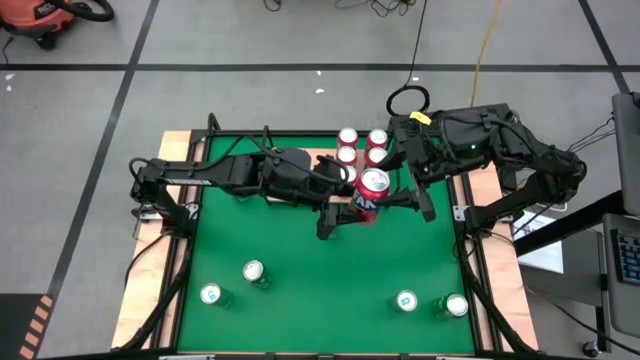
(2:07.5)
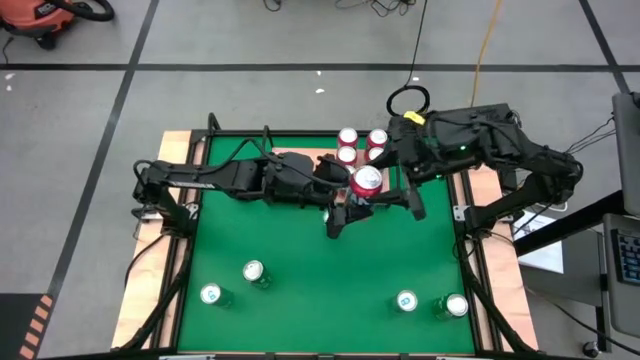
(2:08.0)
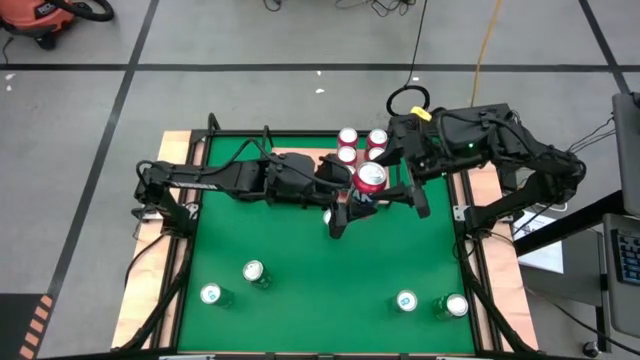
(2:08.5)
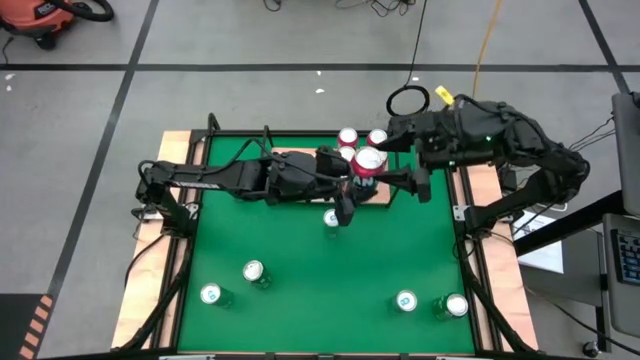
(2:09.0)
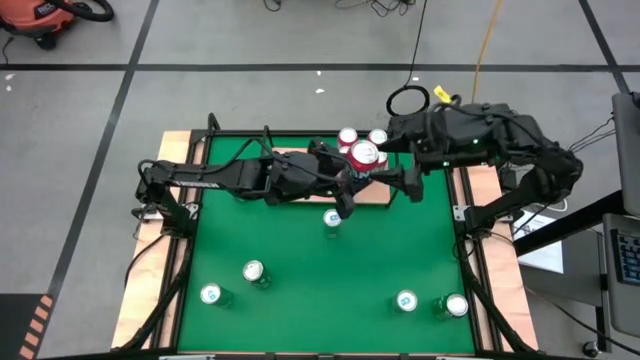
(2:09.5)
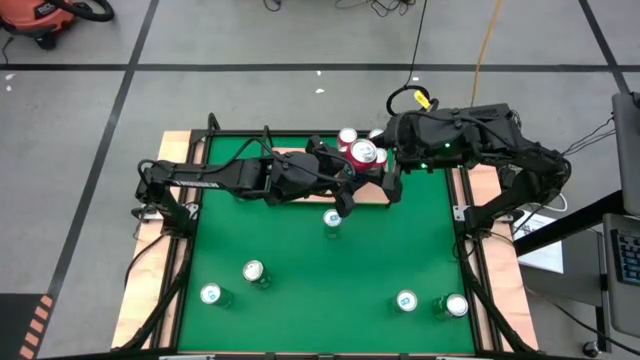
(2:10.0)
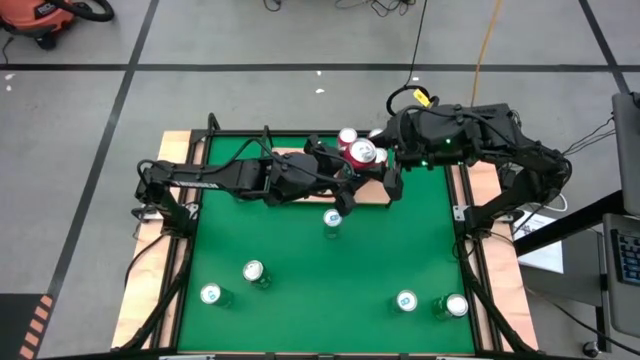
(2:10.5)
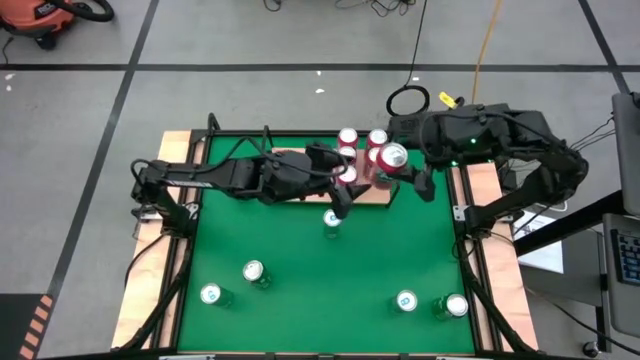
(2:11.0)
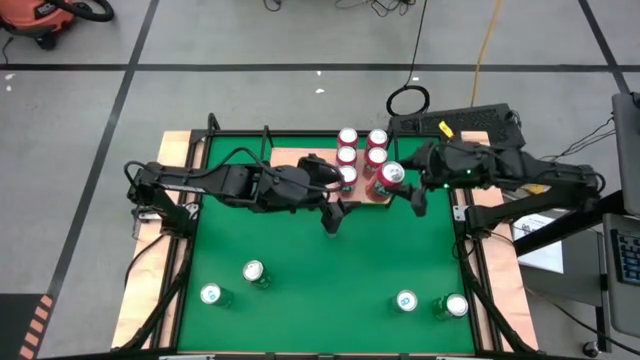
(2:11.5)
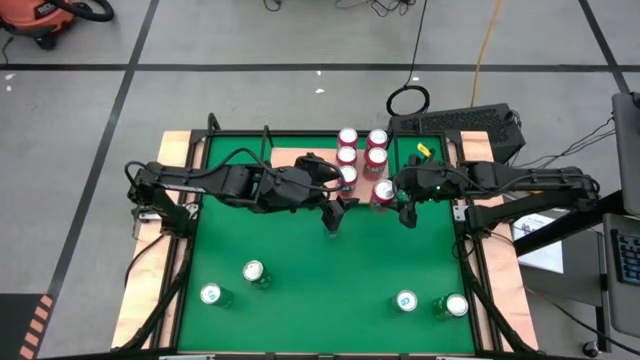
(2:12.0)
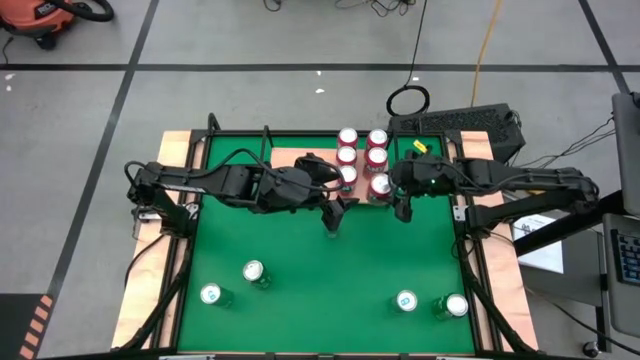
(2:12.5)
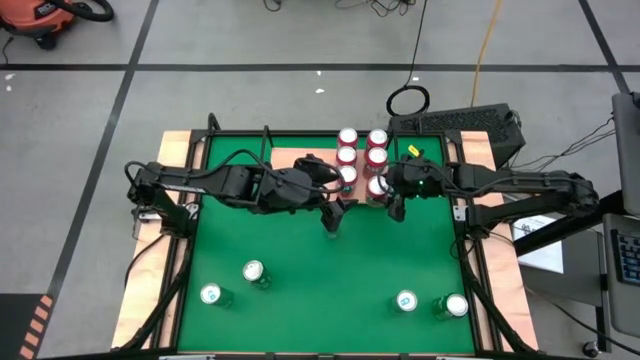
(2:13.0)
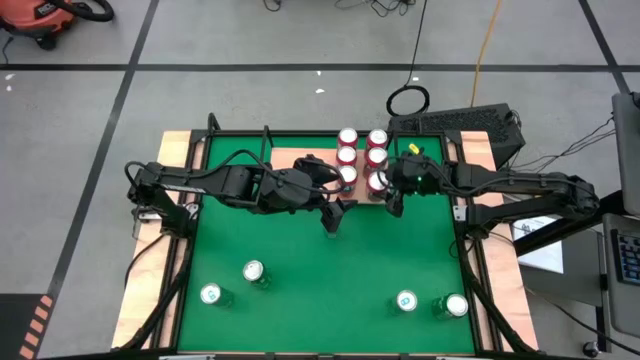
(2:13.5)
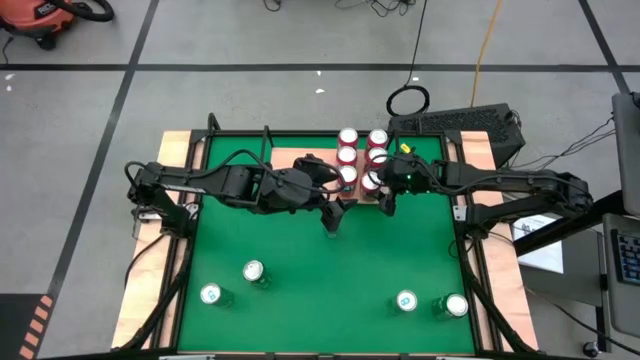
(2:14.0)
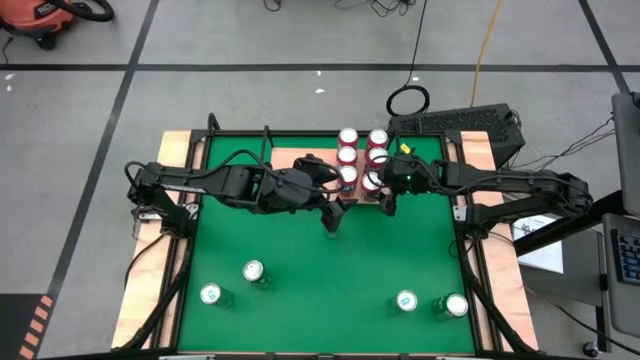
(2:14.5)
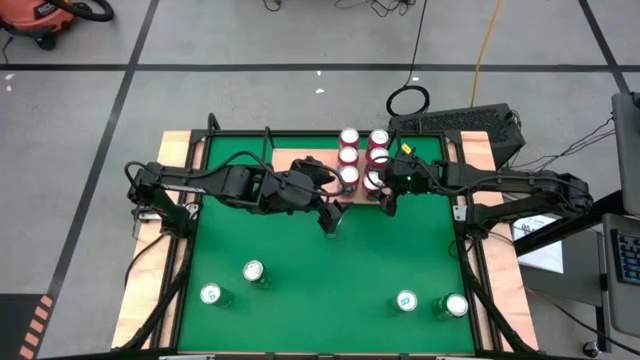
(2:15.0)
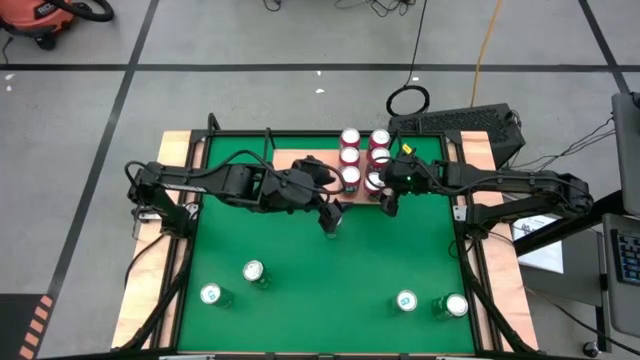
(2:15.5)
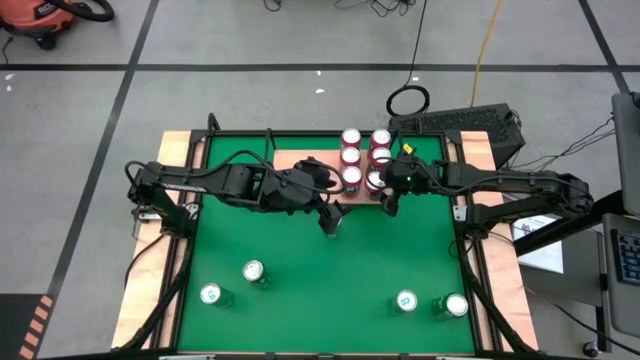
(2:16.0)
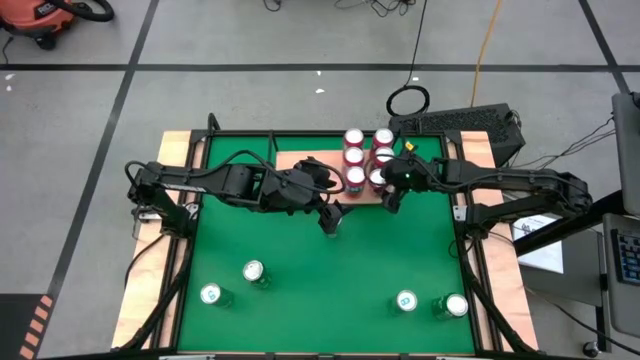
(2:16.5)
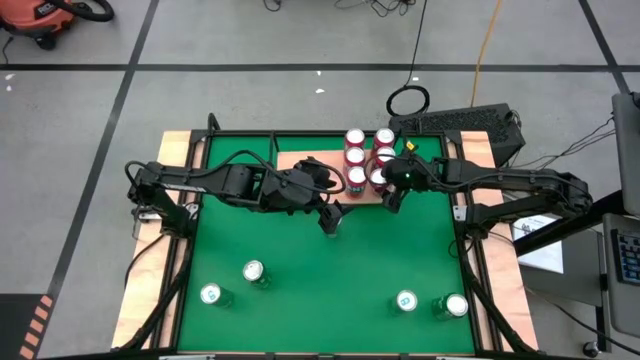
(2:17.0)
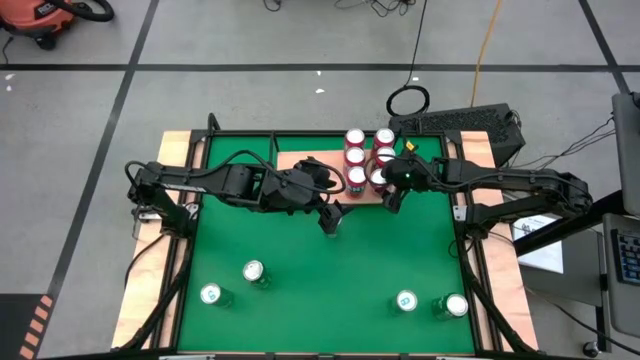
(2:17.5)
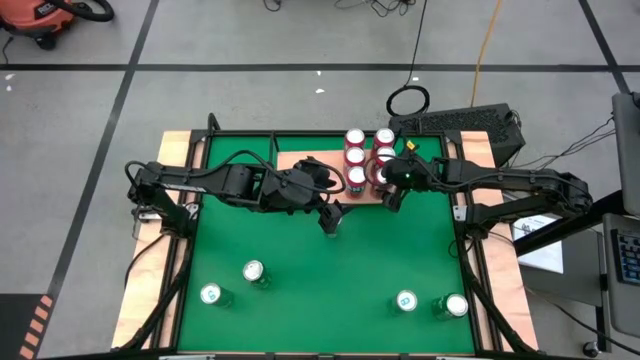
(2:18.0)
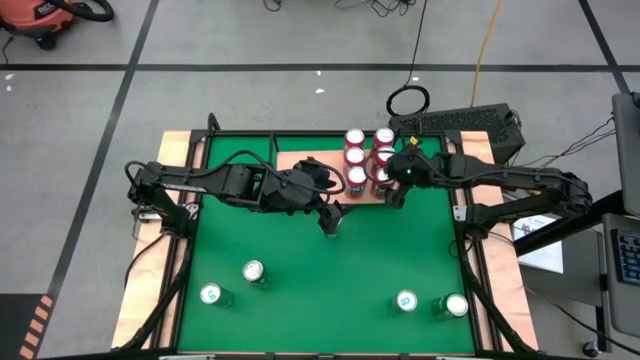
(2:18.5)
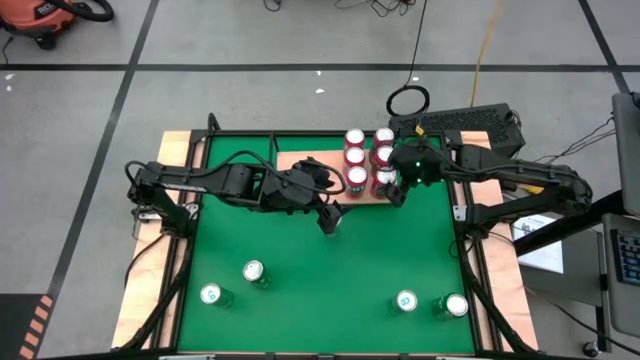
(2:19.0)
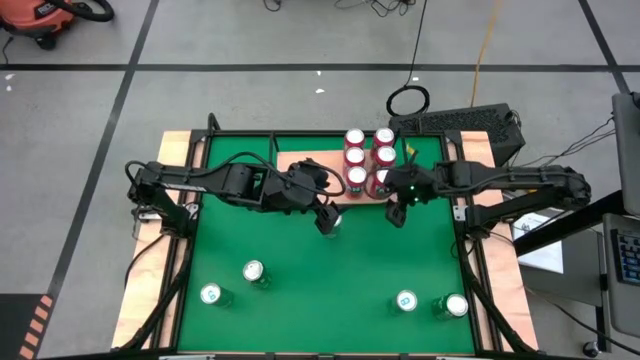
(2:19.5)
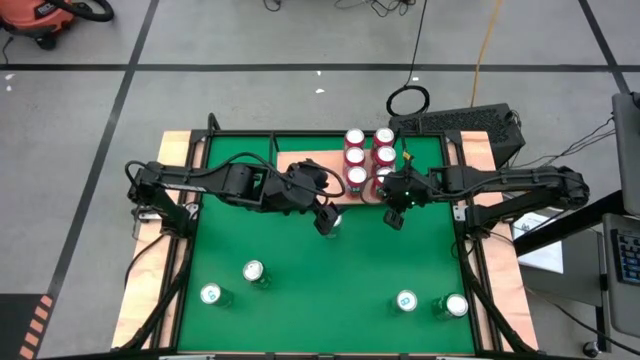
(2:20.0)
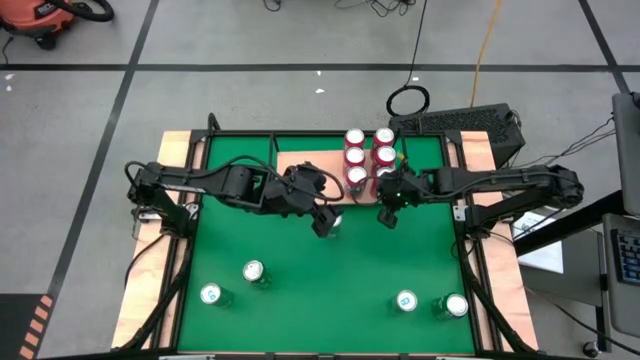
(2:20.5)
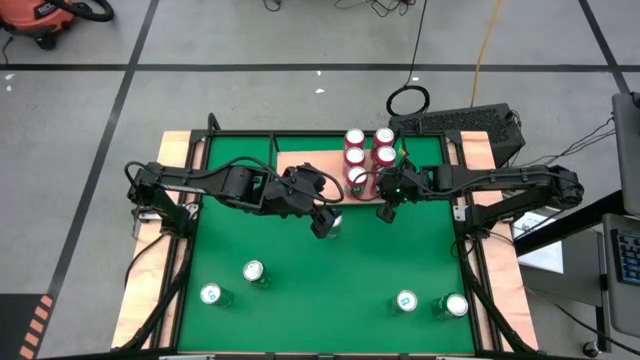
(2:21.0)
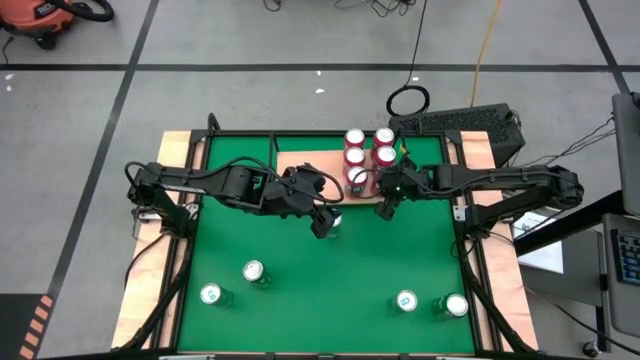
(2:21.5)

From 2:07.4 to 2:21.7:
Task: Place canned beverage on shelf
Put the red soda can on the shelf aligned with the other red soda can on the shelf

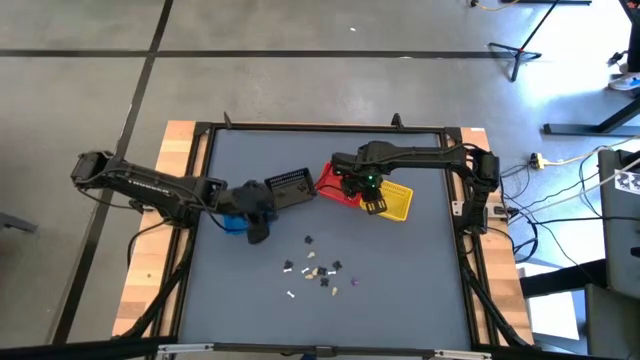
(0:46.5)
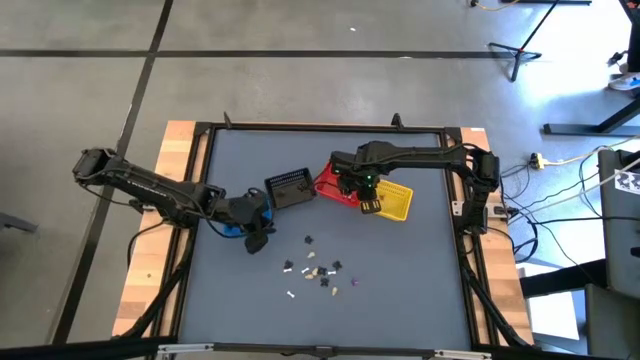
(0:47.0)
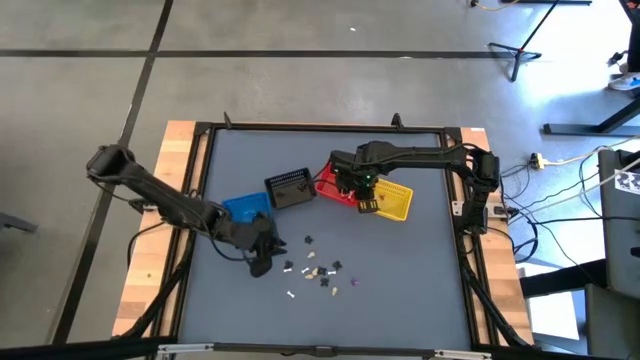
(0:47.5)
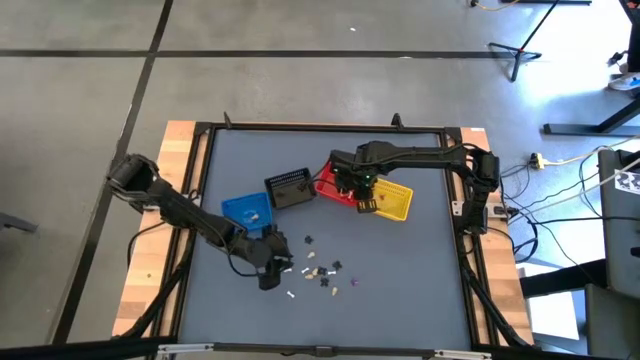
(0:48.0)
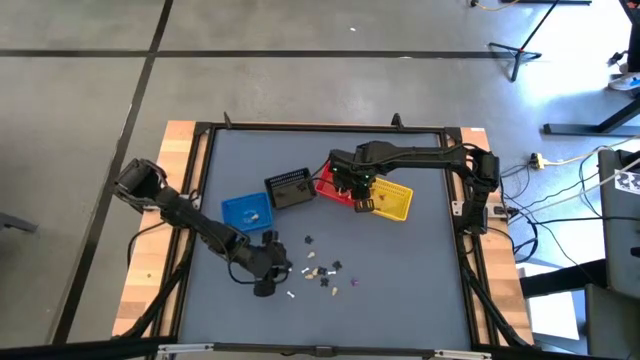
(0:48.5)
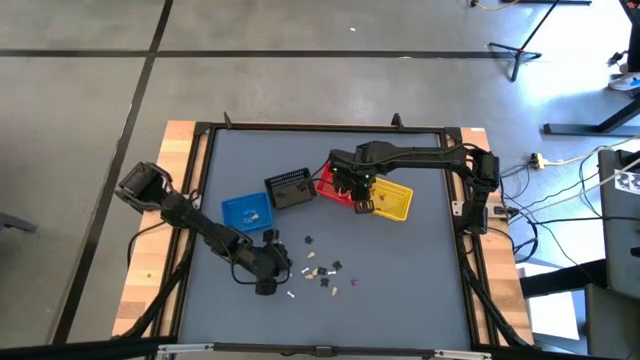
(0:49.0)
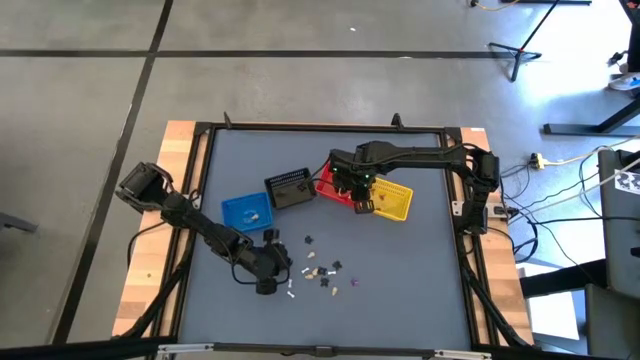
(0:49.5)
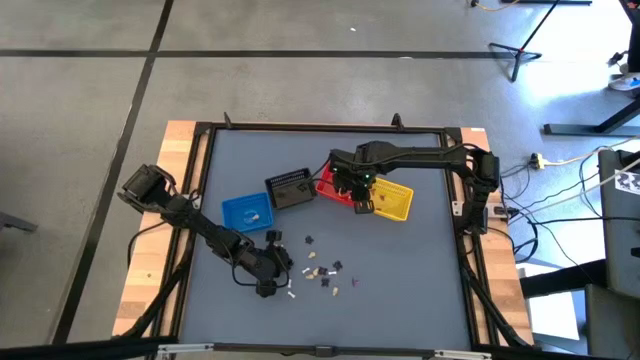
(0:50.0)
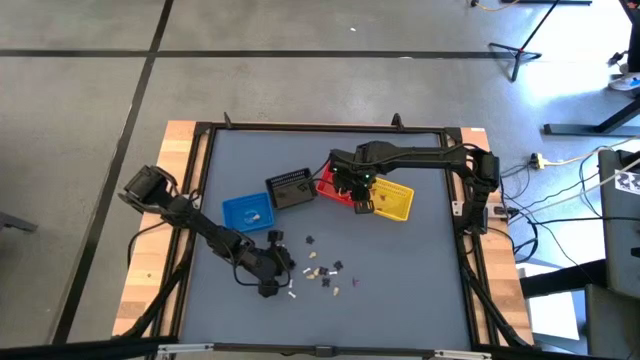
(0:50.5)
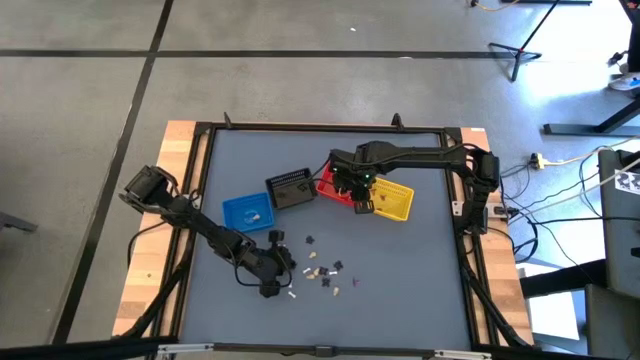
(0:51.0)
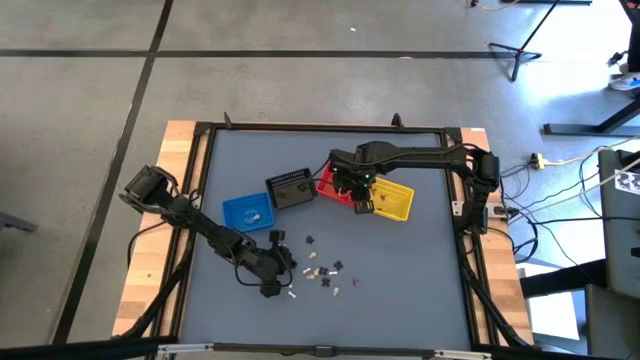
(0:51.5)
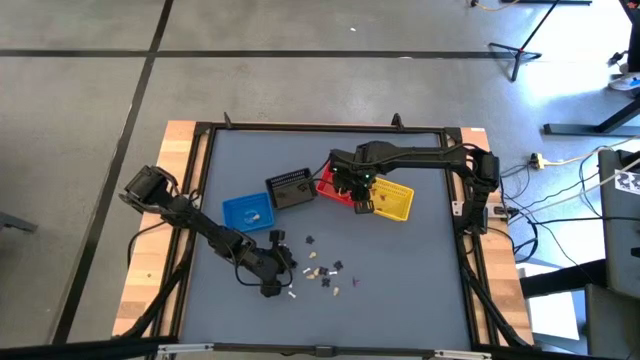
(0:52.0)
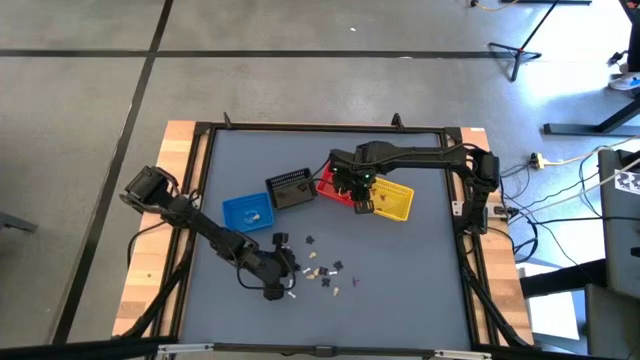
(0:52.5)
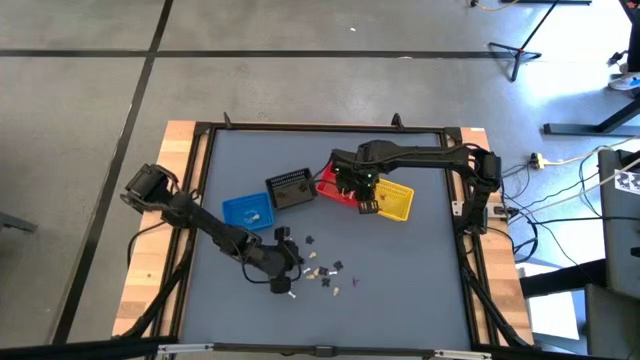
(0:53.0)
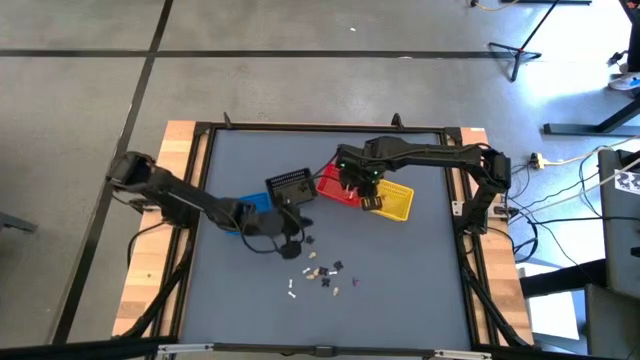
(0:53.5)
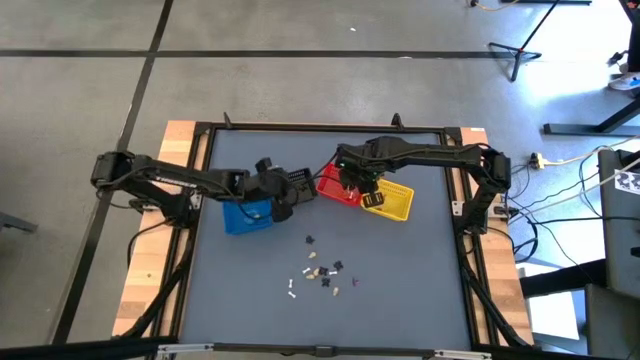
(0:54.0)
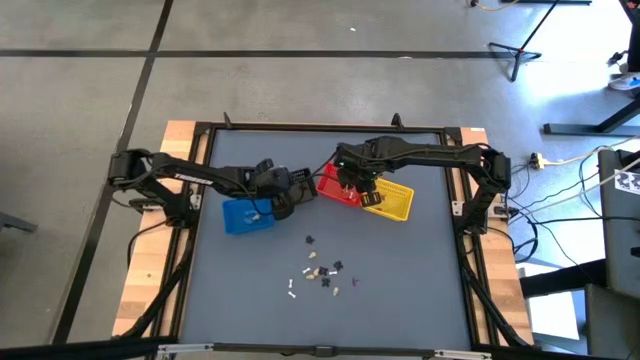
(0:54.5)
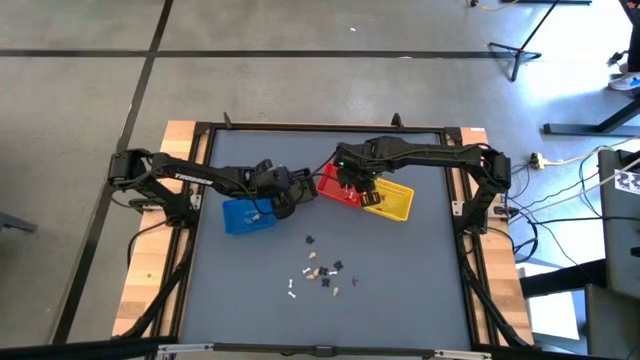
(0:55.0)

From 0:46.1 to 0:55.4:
Task: Sort Halloween decoration
Put the black spider toy into the black bin
